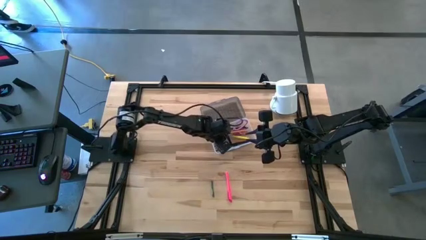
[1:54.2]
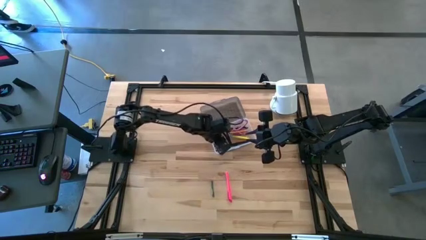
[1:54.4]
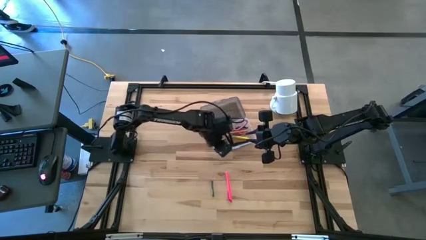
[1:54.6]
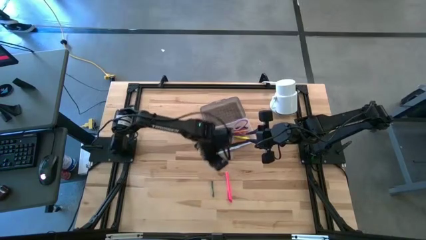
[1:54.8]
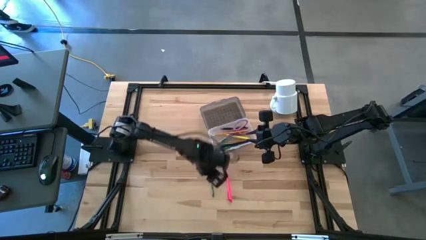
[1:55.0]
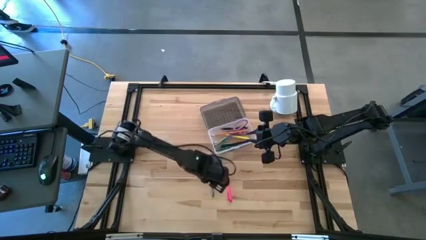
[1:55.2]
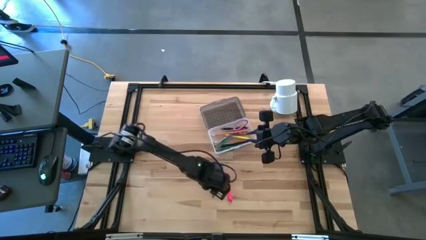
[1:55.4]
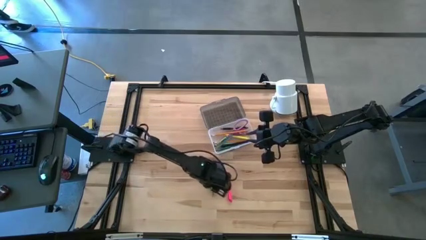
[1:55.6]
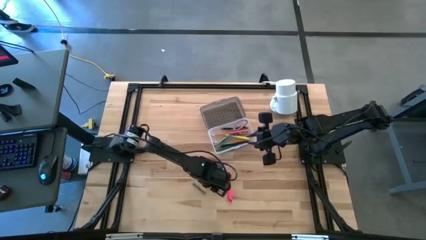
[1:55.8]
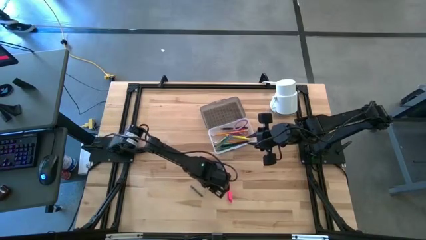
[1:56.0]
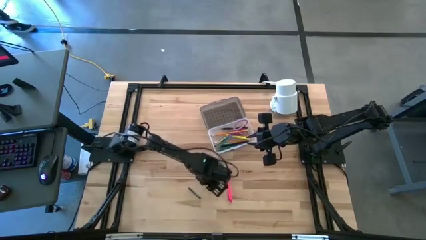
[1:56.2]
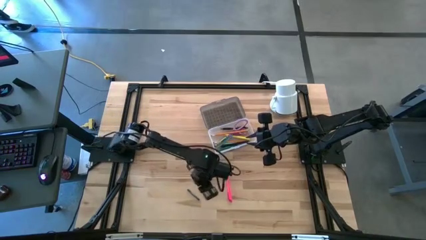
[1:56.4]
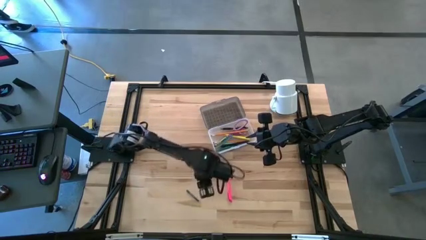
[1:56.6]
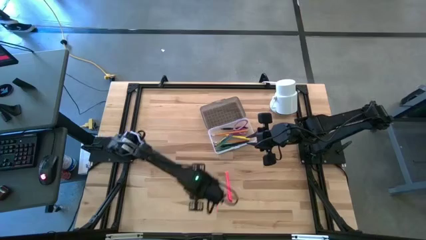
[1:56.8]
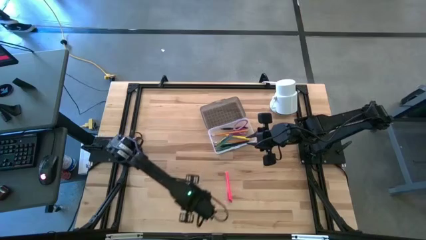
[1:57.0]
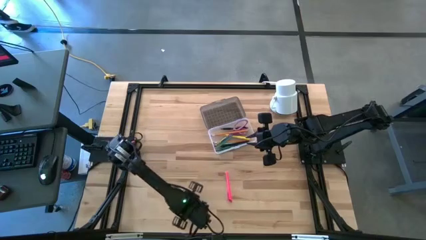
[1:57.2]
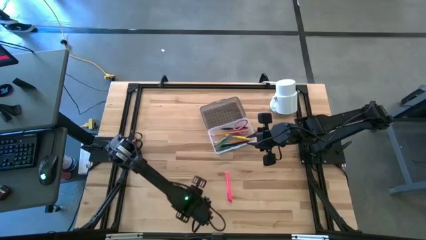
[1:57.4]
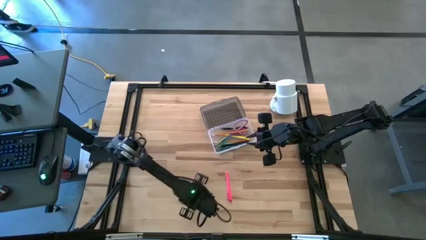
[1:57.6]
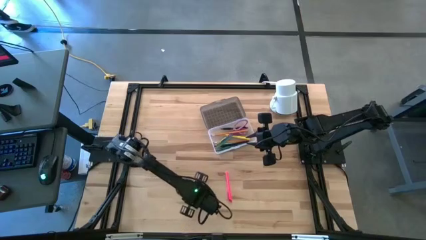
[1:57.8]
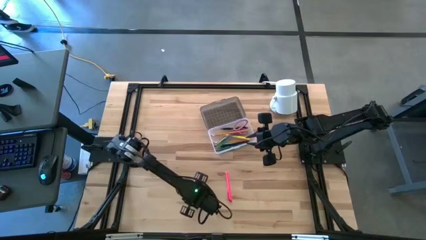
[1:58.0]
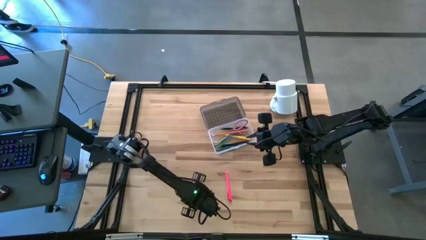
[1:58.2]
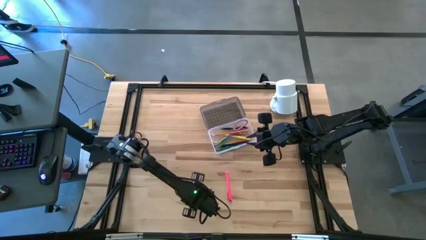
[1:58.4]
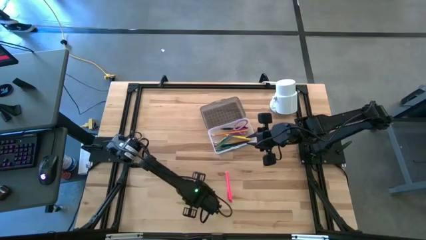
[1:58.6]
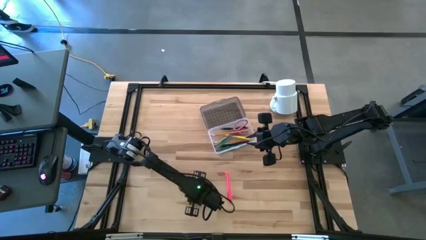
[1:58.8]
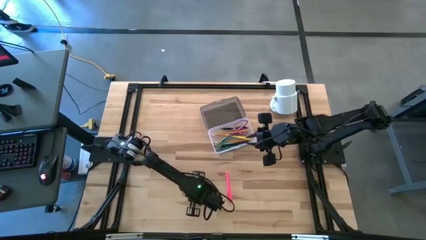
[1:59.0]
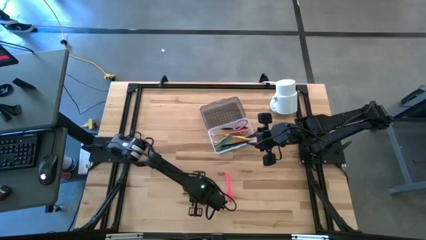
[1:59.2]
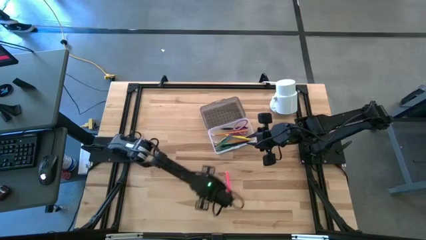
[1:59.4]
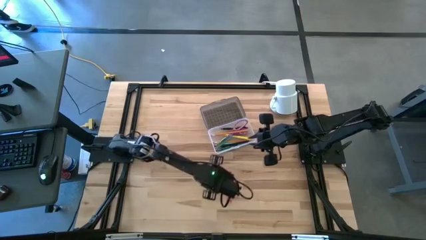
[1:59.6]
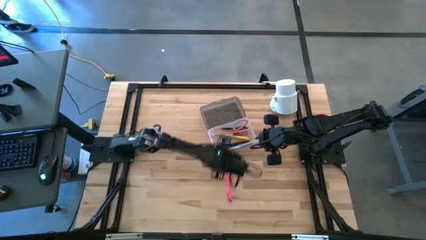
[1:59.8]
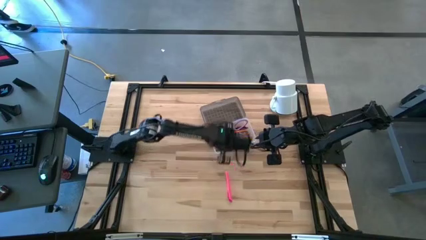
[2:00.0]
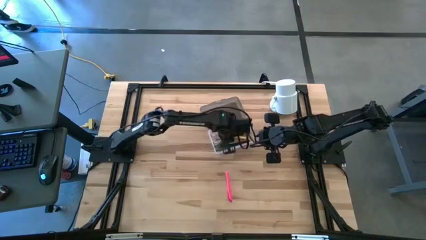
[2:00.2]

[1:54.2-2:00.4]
Task: Pick & place school supplies into a supply box
Put the green crayon into the gray supply box

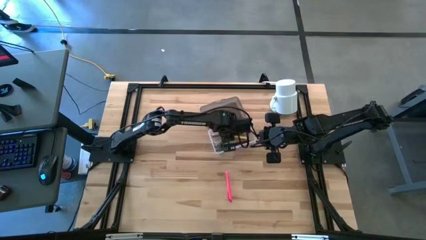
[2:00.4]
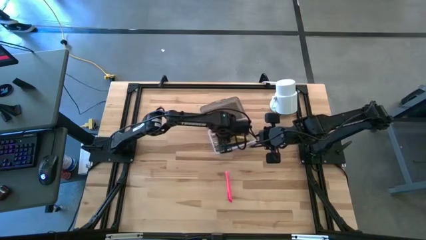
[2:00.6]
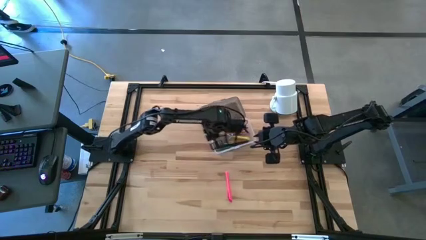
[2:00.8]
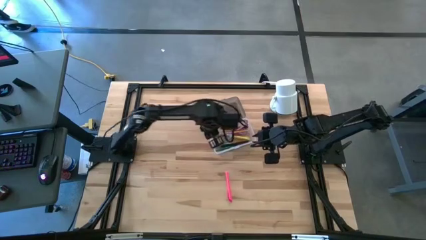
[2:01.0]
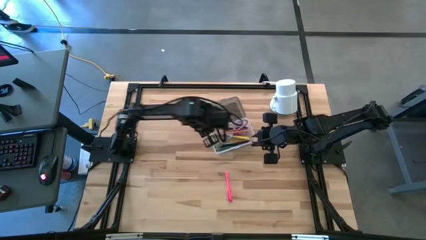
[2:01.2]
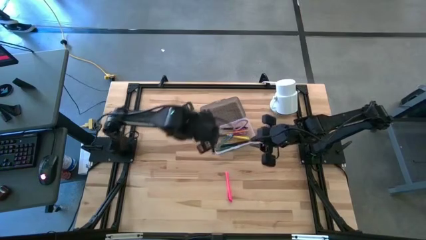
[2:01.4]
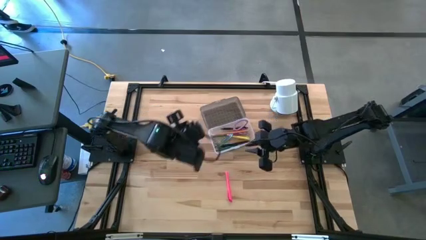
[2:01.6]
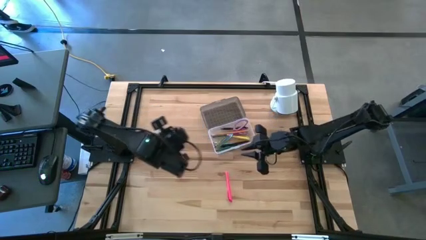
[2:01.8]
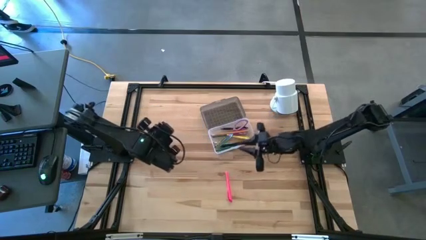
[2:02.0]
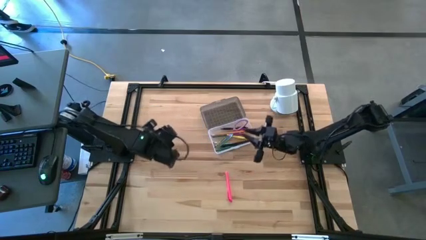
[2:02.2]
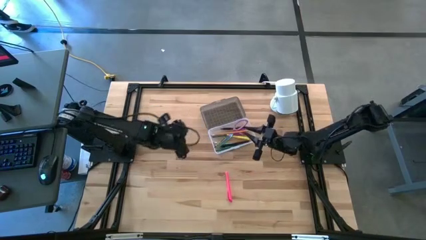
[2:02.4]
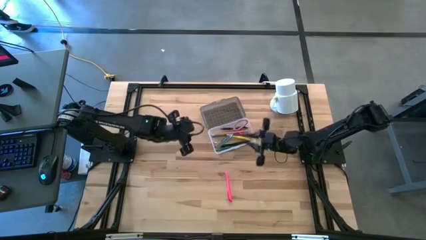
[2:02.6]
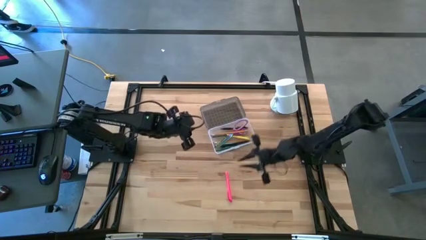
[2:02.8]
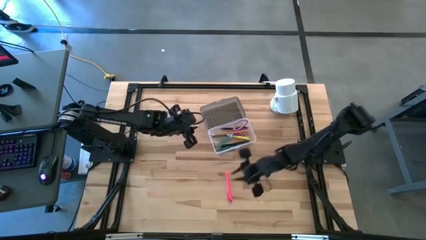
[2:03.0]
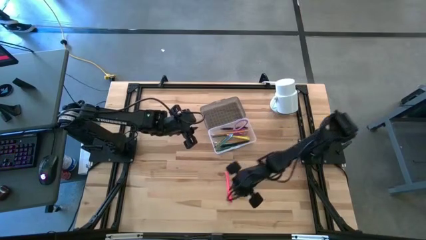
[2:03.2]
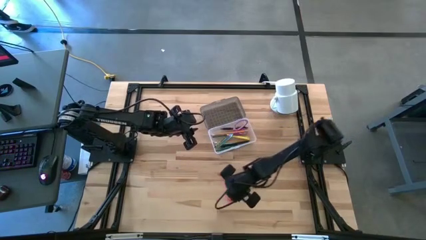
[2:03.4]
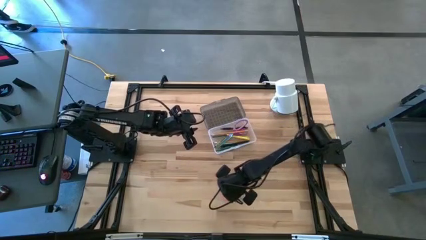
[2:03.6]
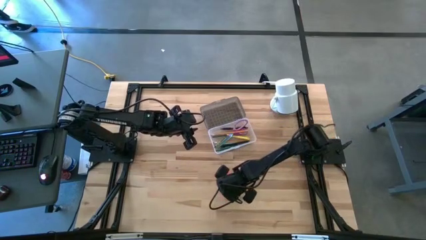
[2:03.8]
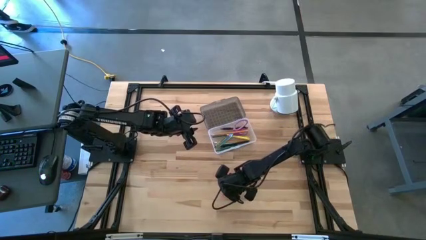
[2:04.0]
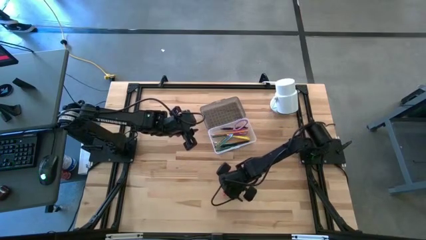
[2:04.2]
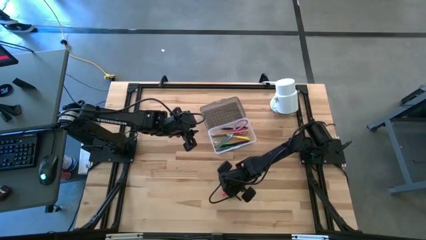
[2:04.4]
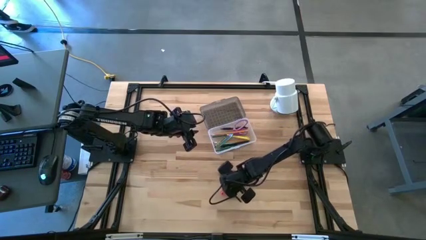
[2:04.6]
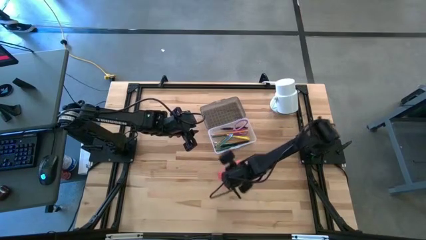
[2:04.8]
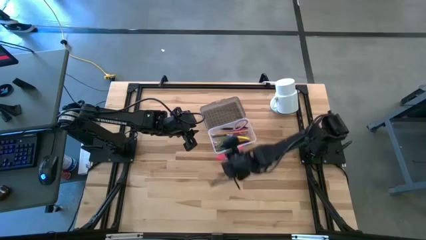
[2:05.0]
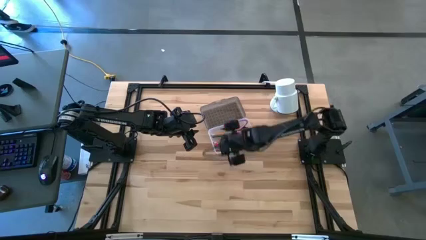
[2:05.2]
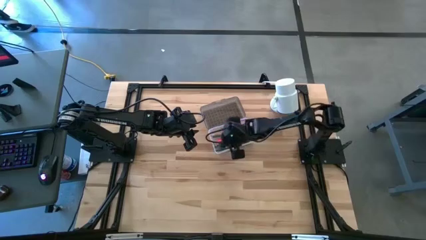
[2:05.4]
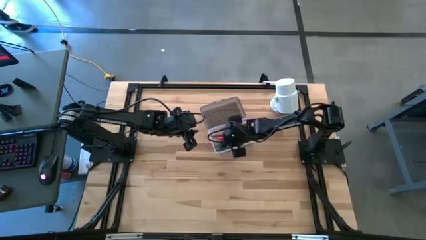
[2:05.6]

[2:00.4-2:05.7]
Put the pink pen into the gray supply box

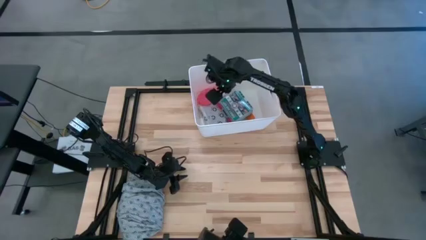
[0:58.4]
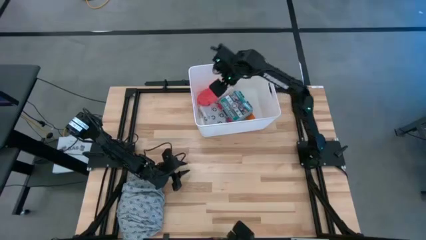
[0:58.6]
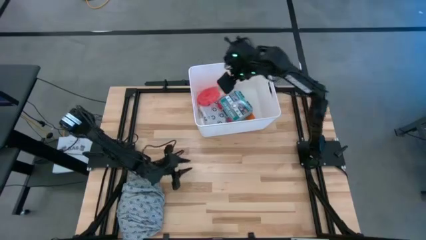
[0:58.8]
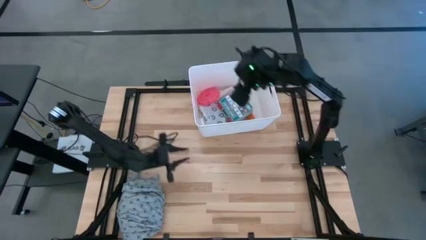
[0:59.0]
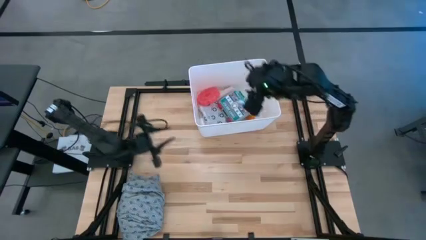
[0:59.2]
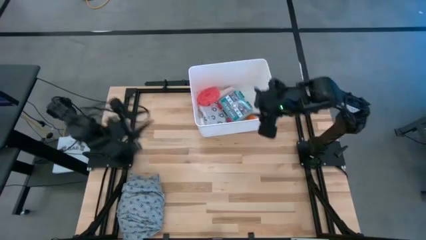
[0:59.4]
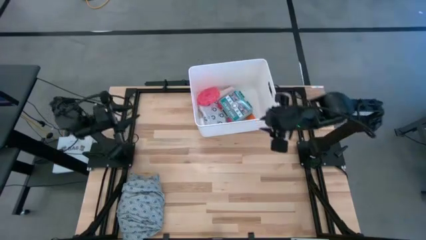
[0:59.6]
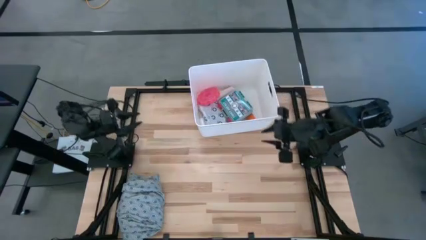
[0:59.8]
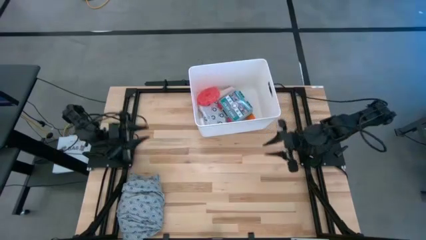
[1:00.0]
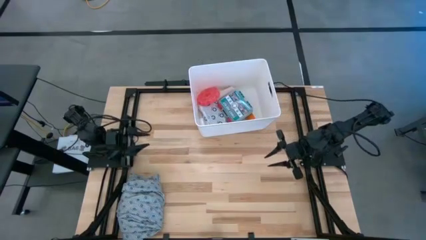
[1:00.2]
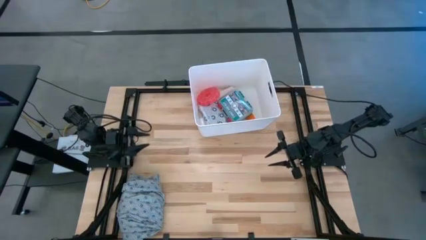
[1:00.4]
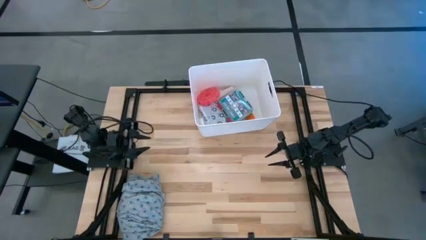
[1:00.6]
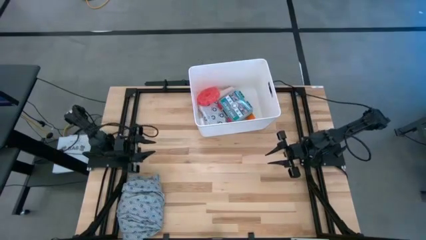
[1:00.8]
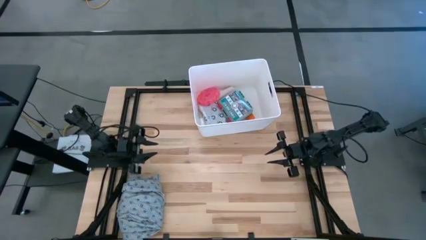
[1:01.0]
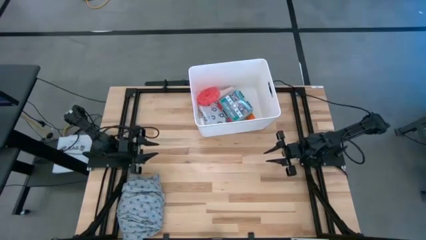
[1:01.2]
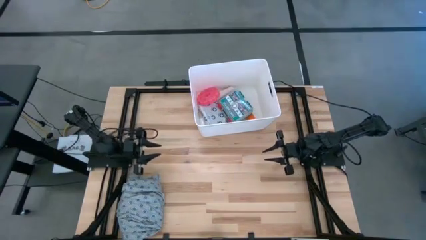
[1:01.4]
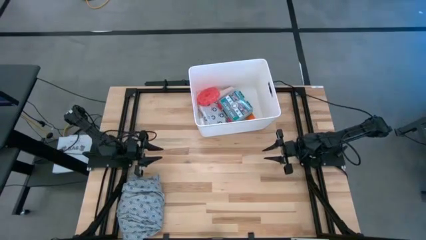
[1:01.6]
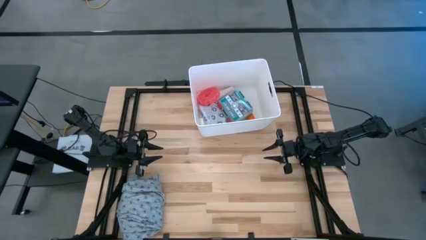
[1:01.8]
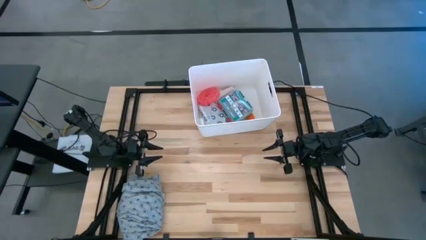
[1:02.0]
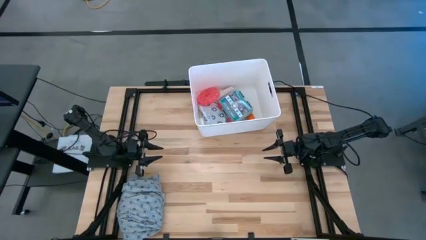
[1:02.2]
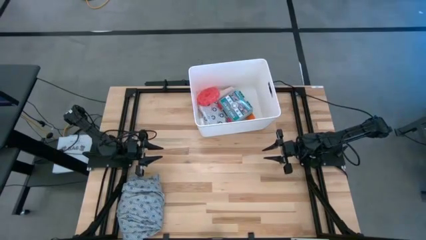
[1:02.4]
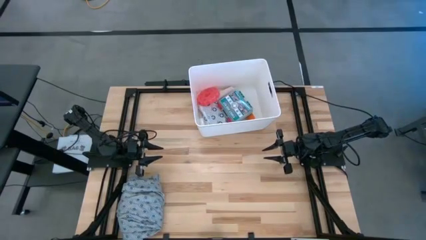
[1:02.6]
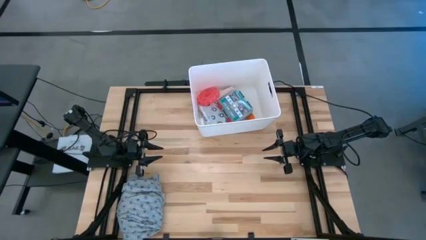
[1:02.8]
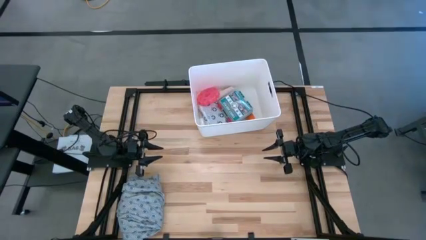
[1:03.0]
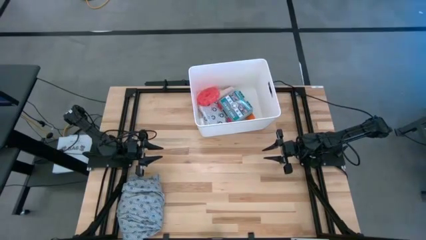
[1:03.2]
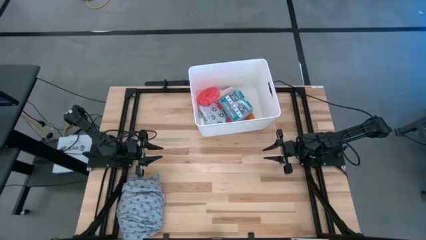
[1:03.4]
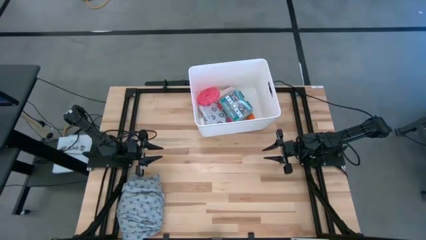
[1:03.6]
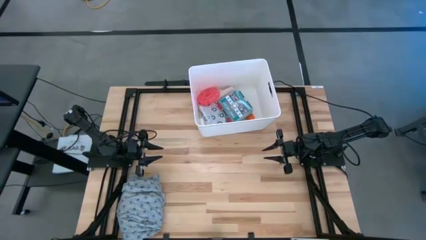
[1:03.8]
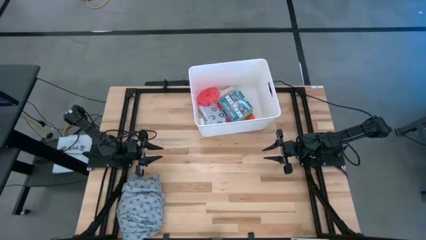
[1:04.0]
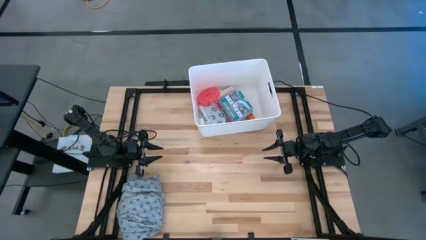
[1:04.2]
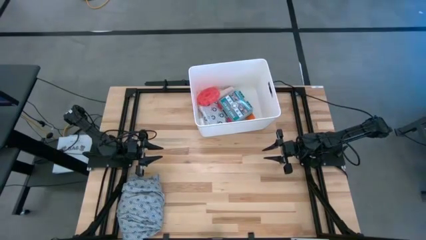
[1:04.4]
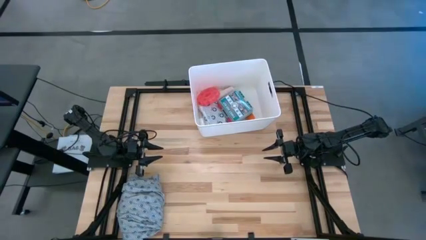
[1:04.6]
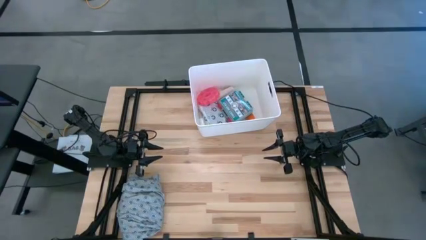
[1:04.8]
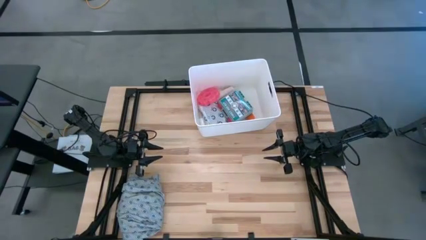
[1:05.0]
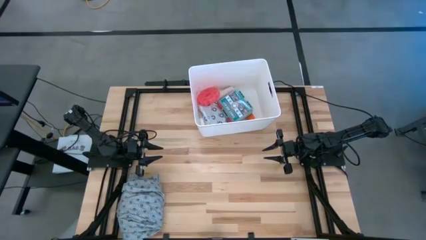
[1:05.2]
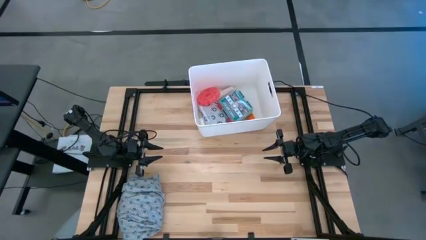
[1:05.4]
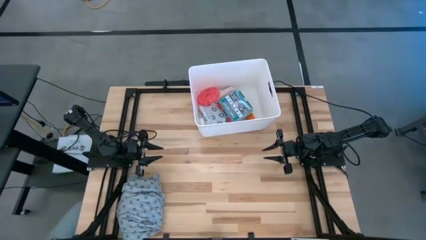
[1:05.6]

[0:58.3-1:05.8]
Task: Pick & place medical supplies in basket/bin
Return to Home Position
